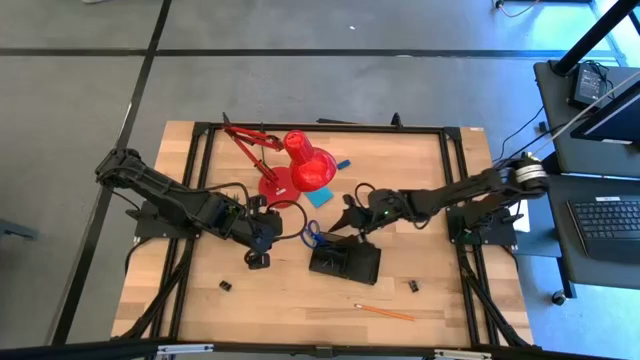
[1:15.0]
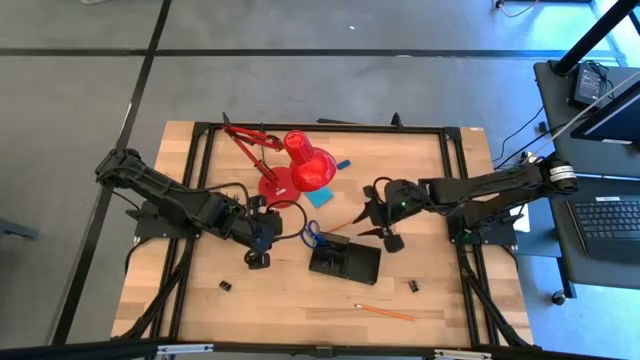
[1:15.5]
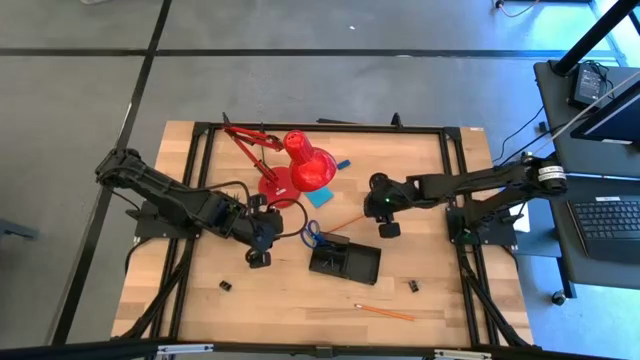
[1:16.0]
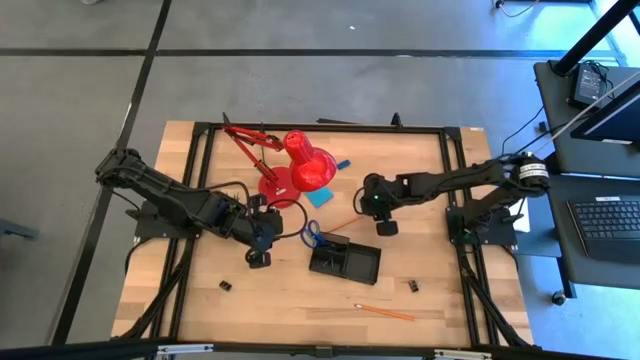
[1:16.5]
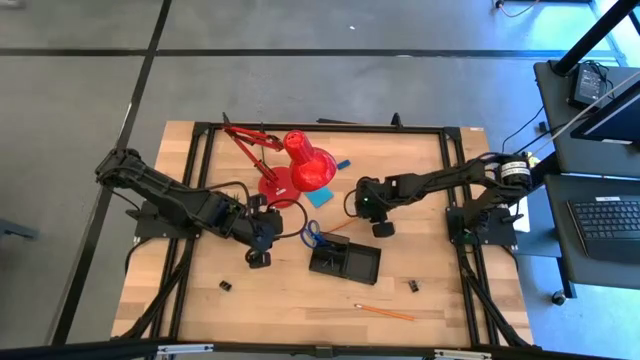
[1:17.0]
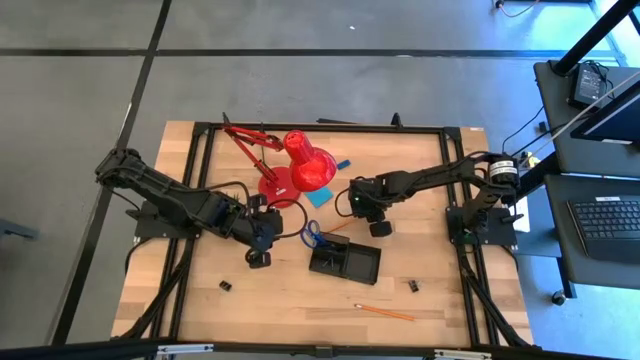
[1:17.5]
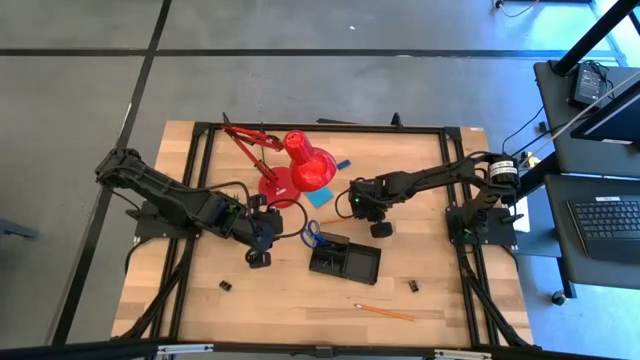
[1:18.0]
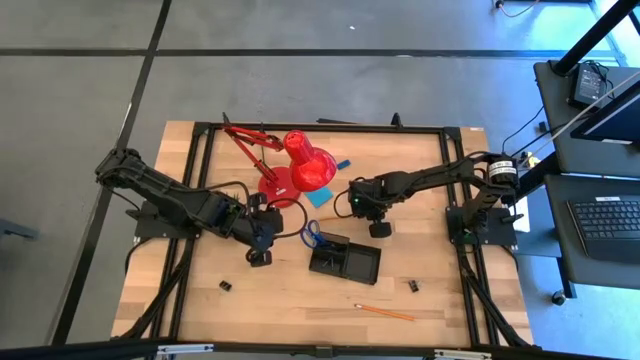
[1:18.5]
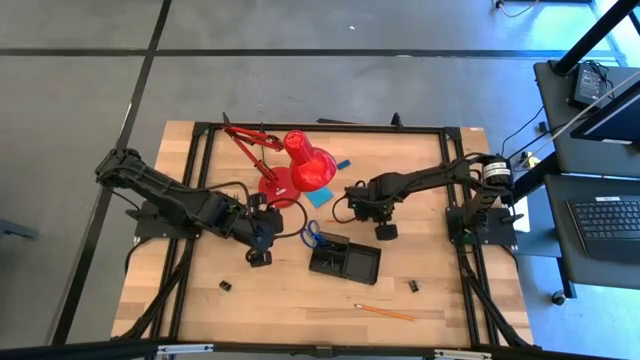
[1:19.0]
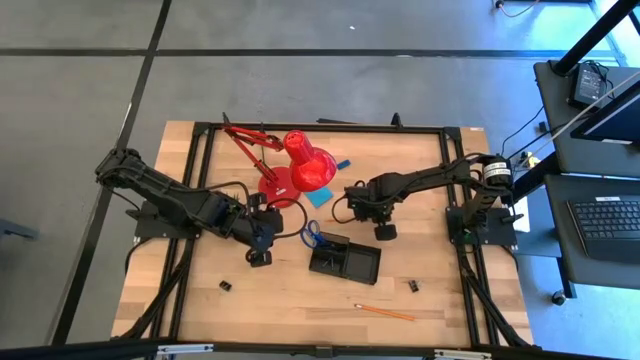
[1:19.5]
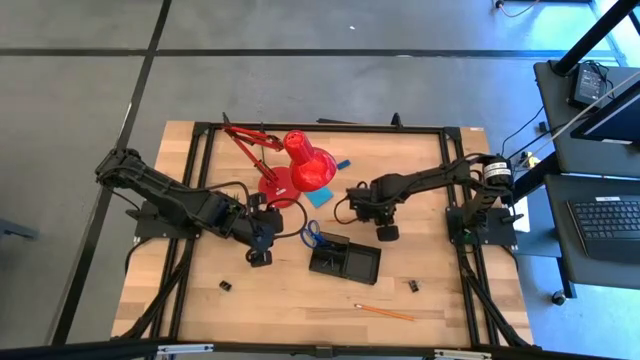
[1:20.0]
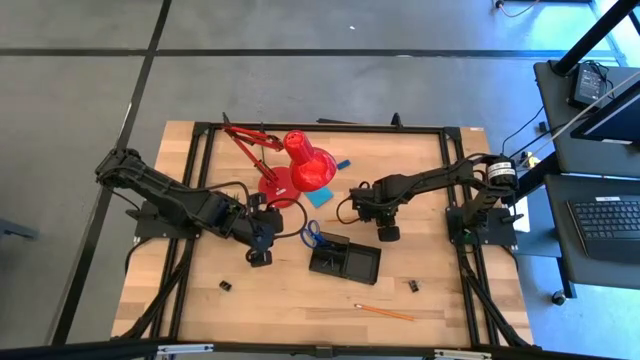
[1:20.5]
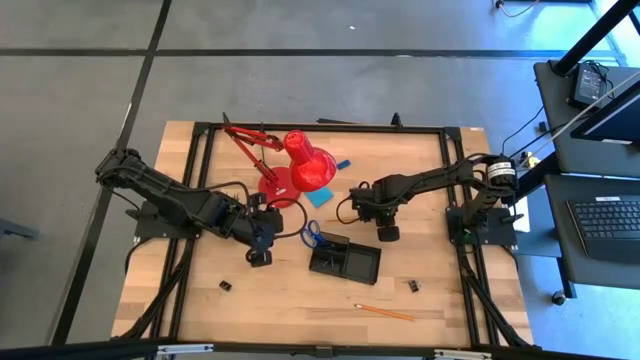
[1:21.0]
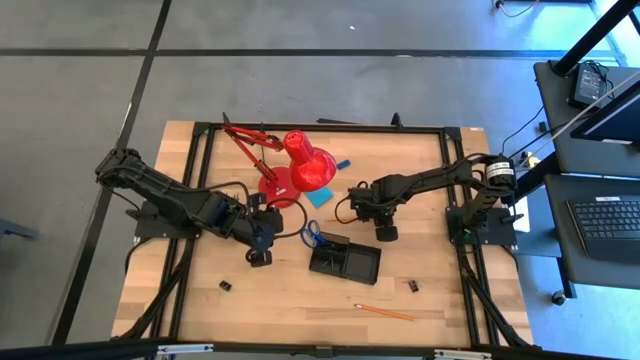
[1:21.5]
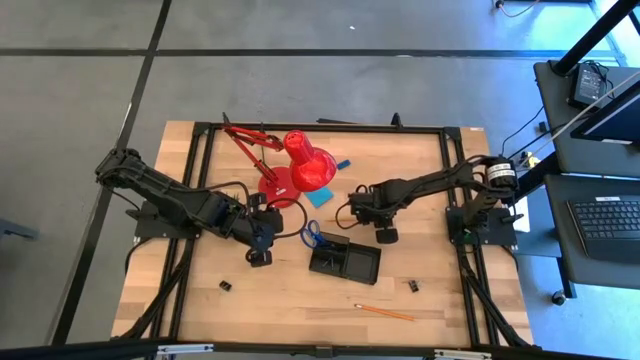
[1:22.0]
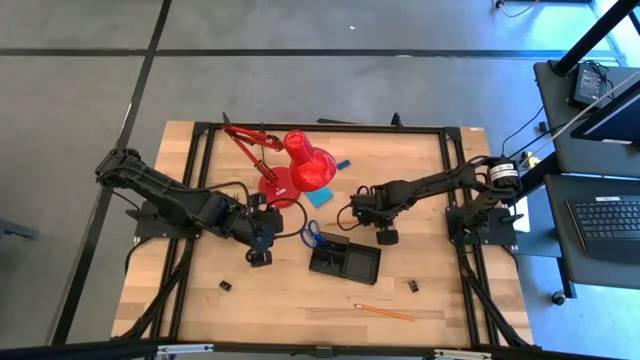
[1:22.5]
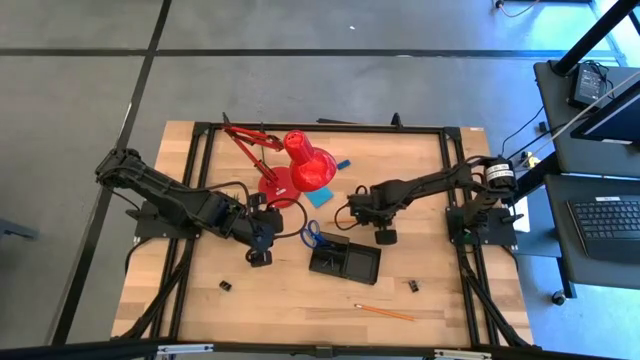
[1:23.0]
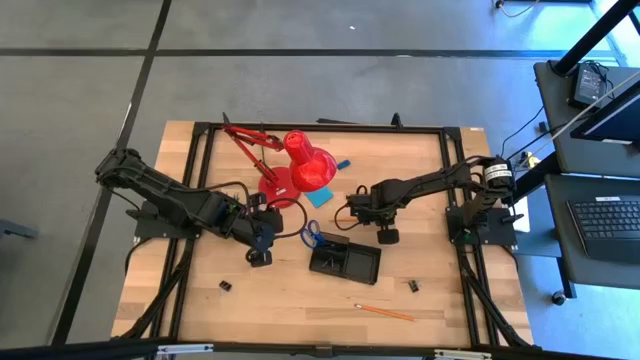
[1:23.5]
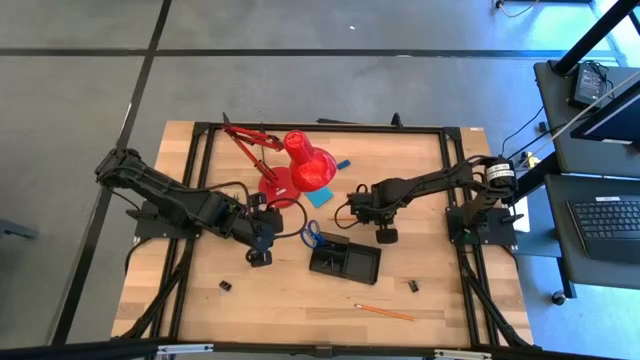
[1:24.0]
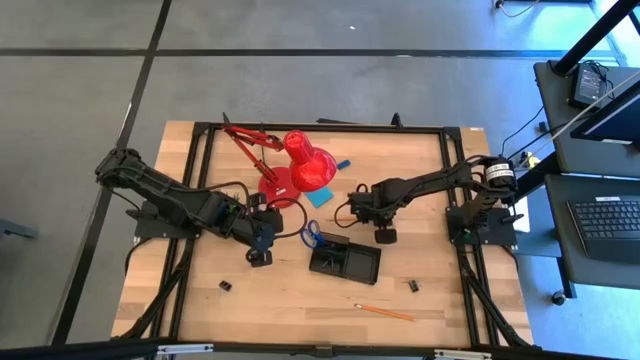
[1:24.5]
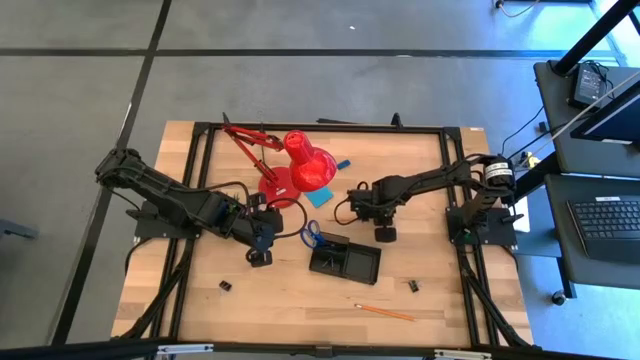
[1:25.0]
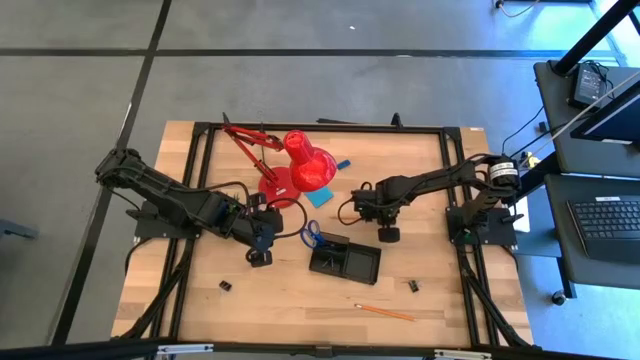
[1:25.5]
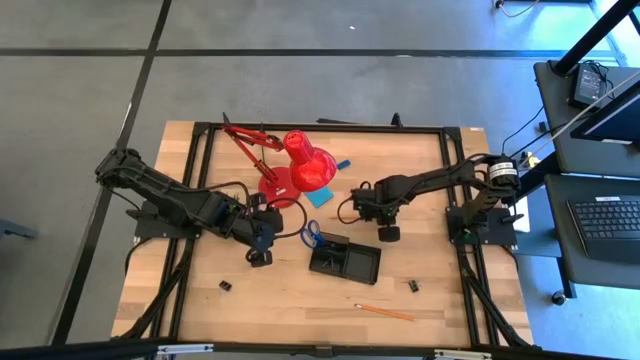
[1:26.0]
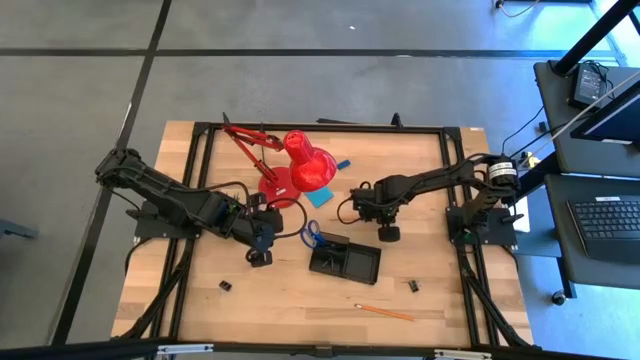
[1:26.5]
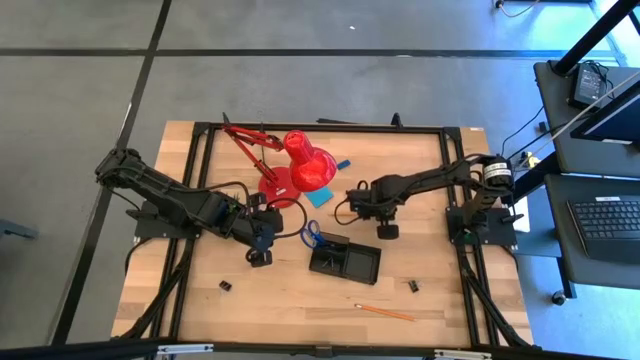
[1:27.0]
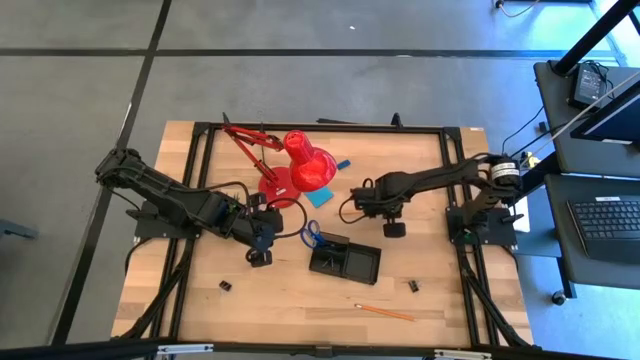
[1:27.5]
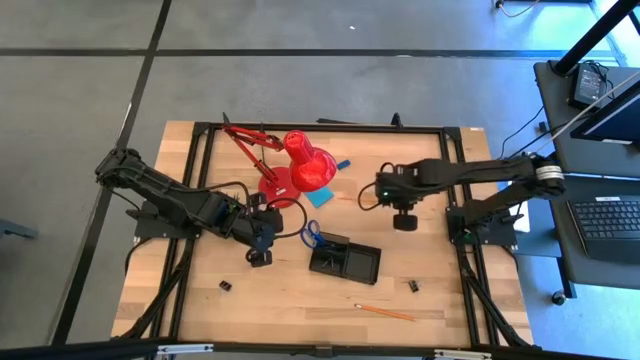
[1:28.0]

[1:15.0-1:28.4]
Task: Pick and place office supplies into organizer
Put the top orange pencil into the desk organizer

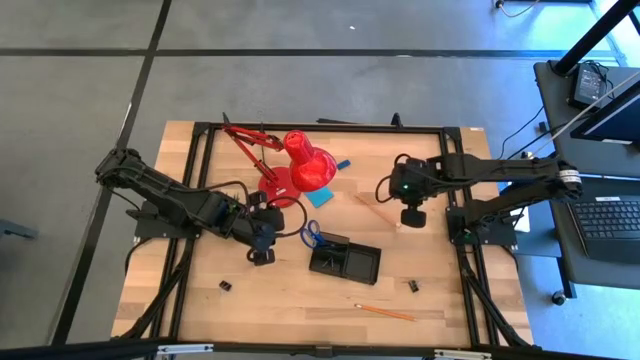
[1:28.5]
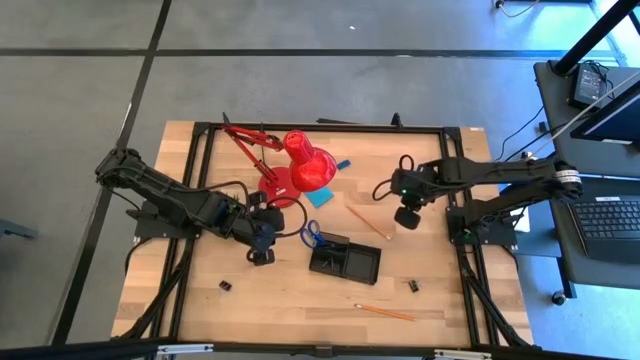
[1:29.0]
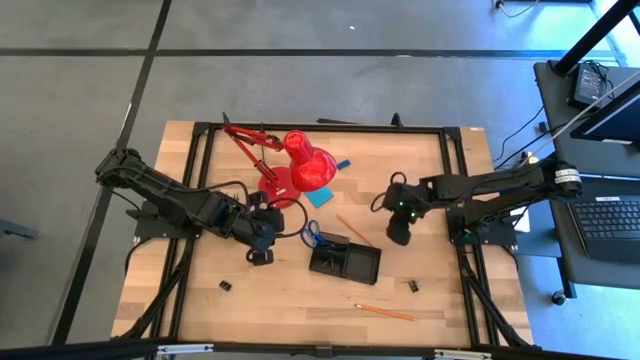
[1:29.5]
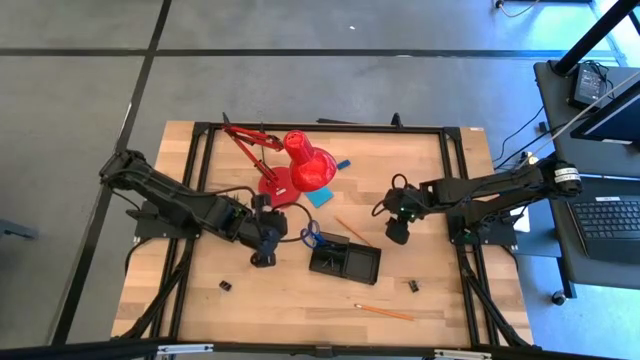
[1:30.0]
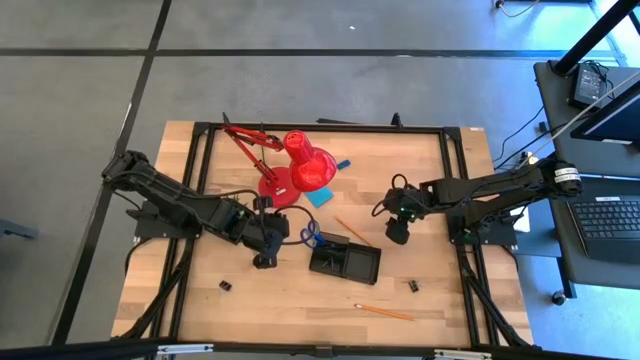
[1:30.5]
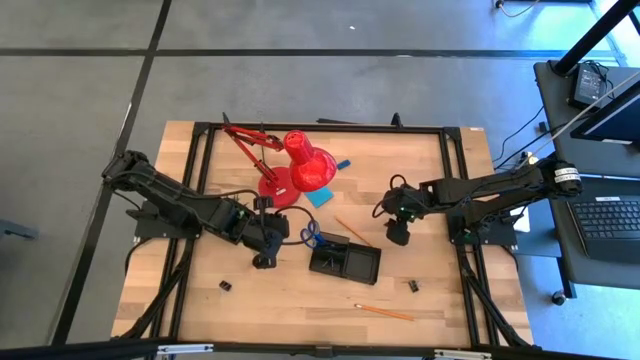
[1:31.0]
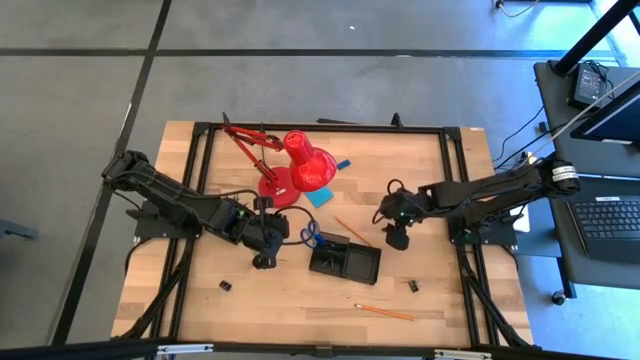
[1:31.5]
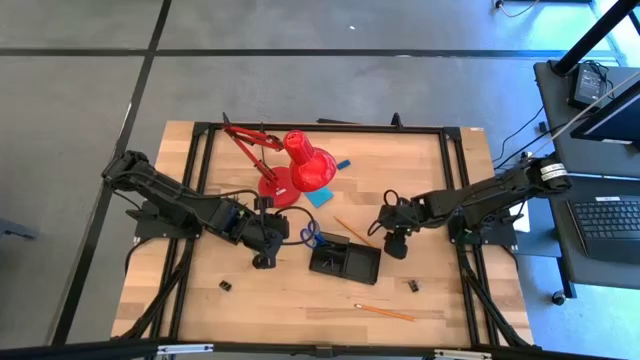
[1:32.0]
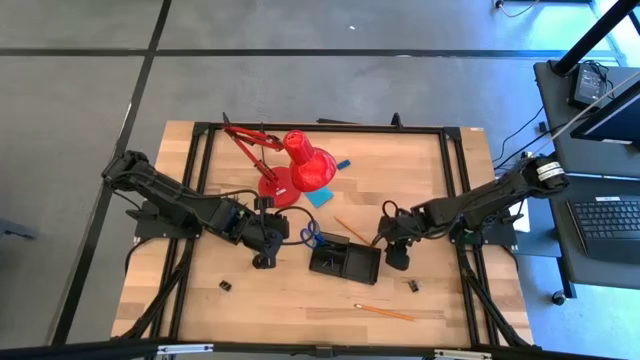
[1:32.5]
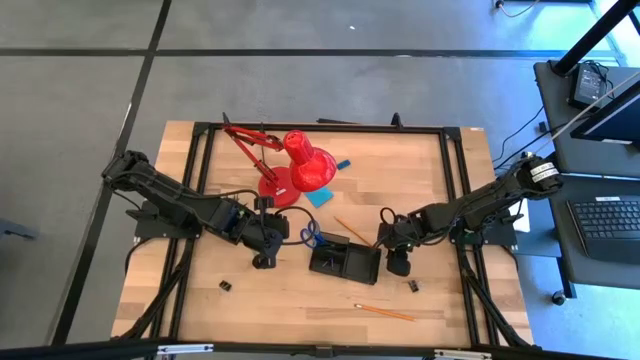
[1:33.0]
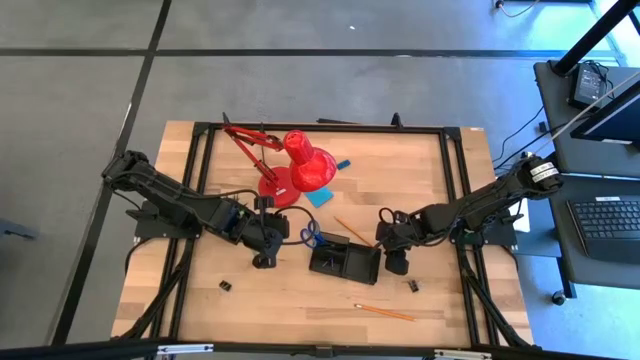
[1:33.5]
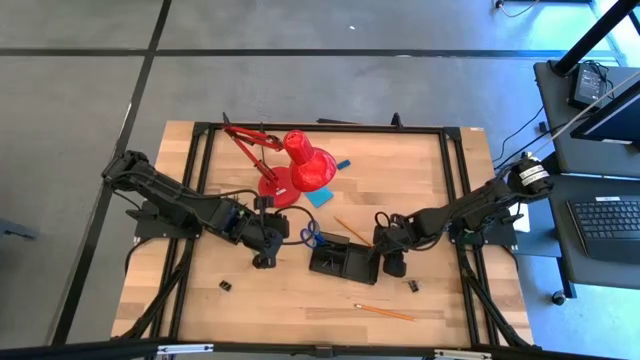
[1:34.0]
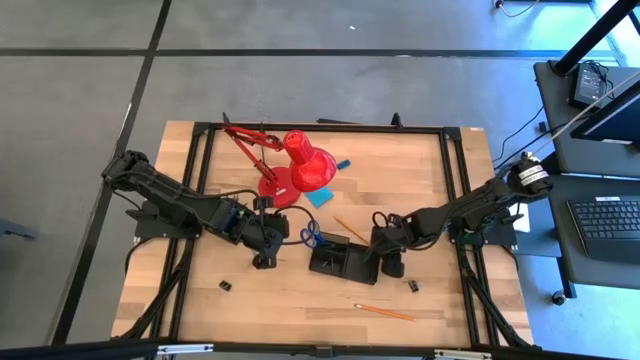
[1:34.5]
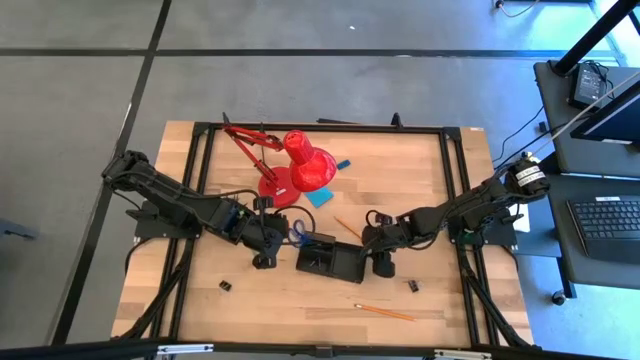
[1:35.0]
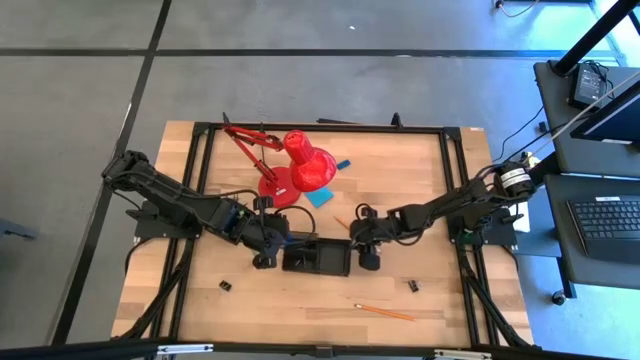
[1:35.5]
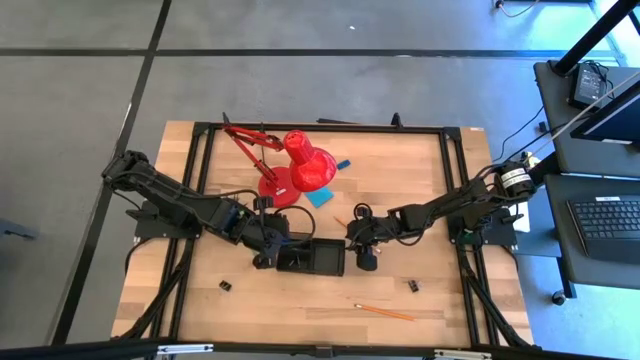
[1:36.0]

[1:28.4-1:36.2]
Adjust the desk organizer on the table
